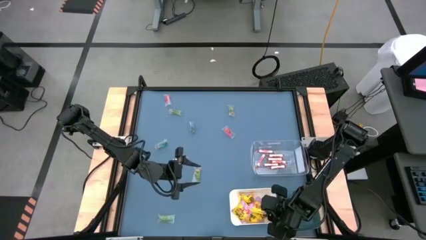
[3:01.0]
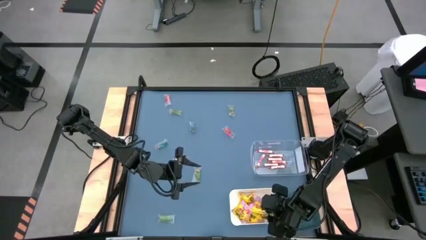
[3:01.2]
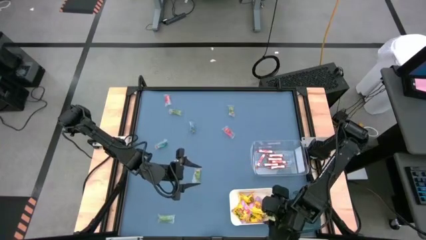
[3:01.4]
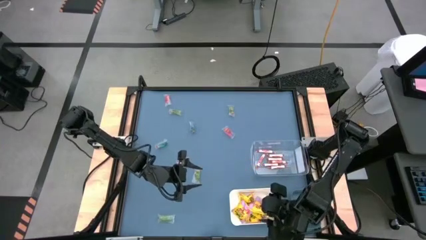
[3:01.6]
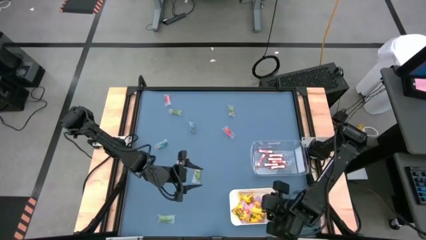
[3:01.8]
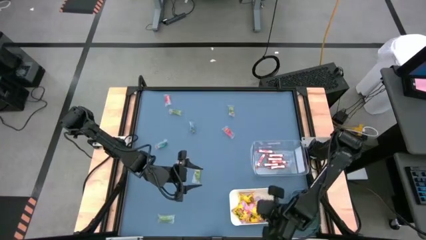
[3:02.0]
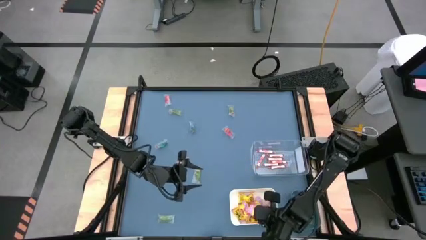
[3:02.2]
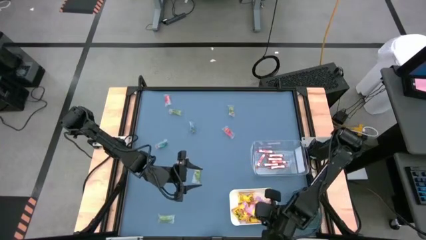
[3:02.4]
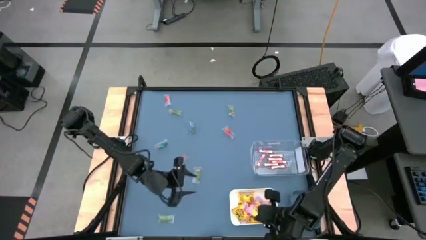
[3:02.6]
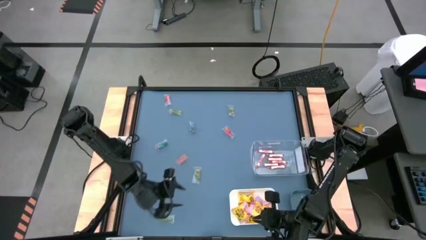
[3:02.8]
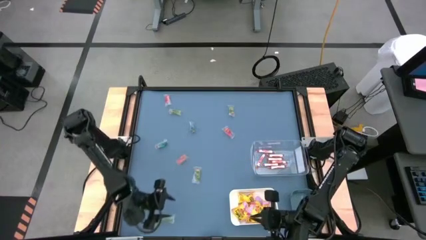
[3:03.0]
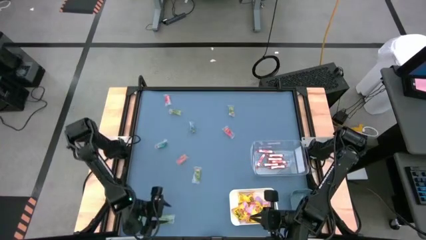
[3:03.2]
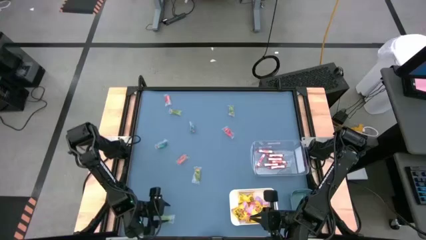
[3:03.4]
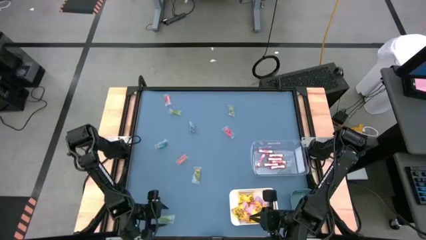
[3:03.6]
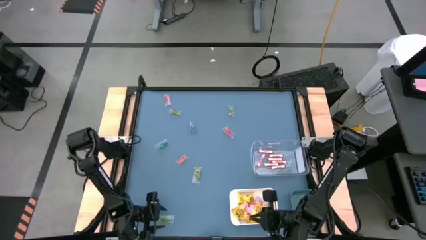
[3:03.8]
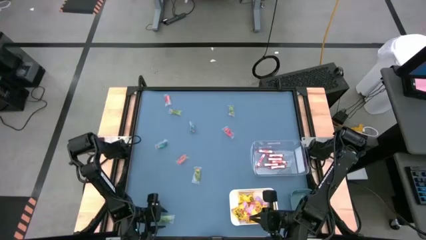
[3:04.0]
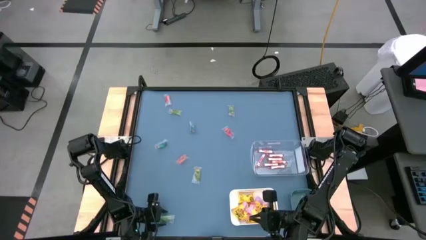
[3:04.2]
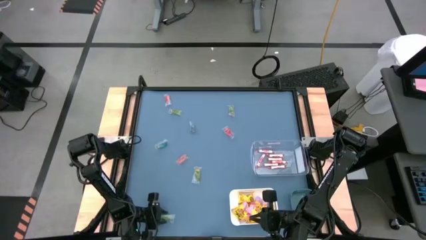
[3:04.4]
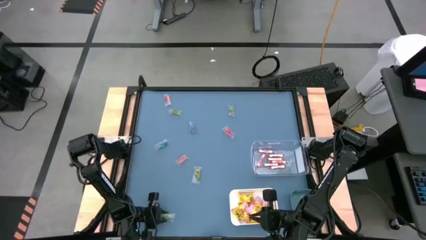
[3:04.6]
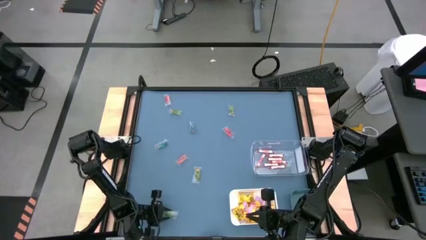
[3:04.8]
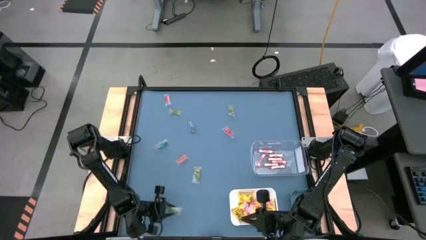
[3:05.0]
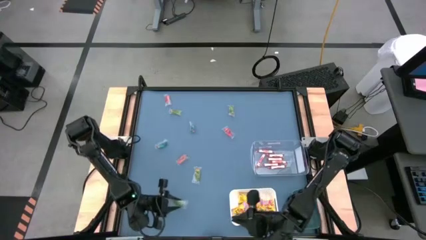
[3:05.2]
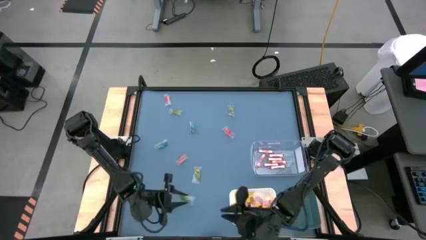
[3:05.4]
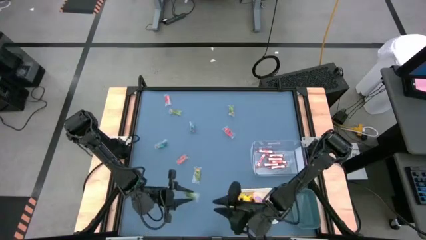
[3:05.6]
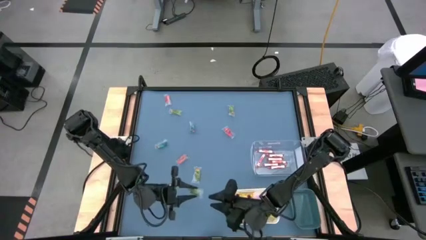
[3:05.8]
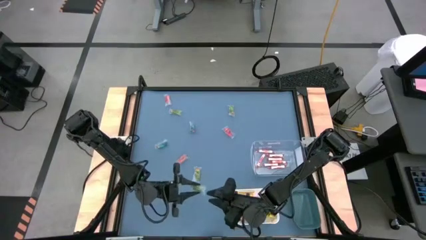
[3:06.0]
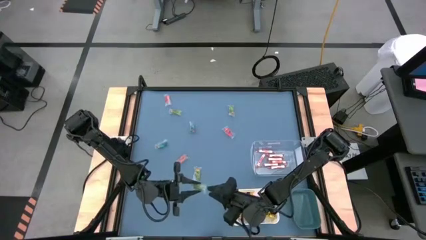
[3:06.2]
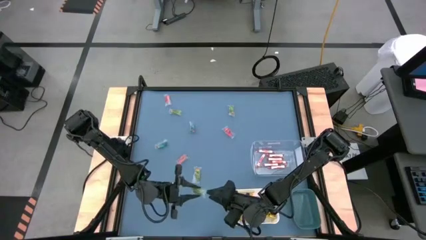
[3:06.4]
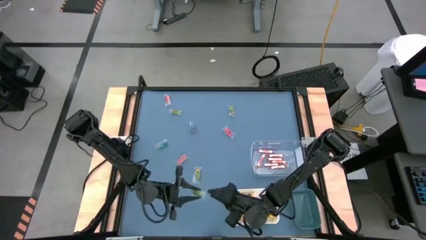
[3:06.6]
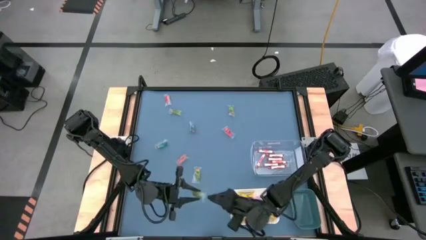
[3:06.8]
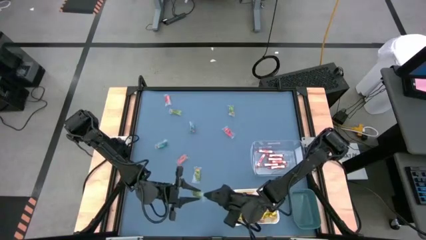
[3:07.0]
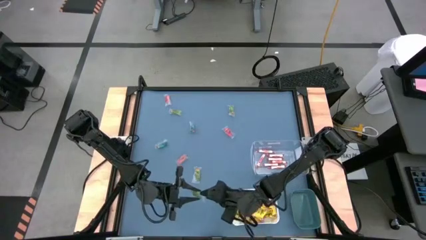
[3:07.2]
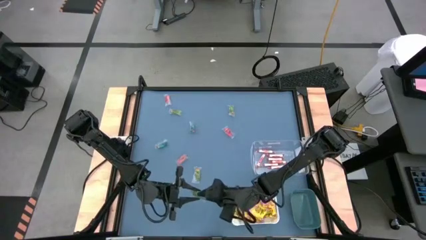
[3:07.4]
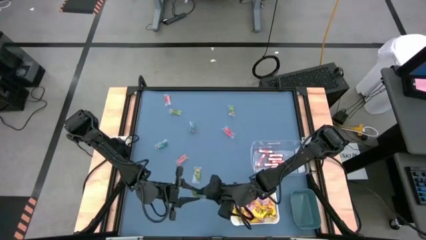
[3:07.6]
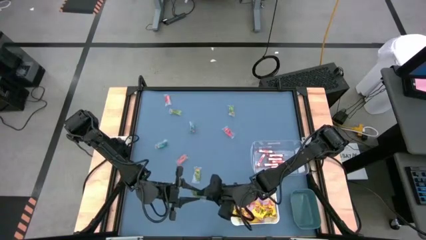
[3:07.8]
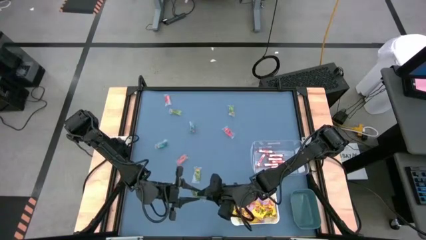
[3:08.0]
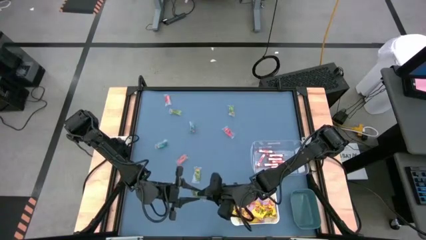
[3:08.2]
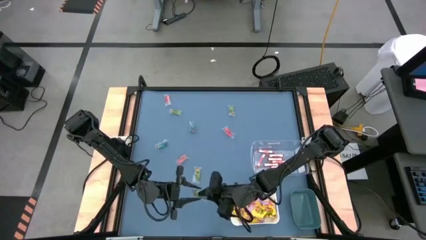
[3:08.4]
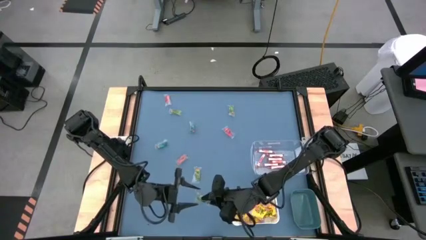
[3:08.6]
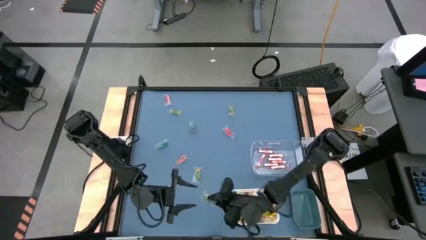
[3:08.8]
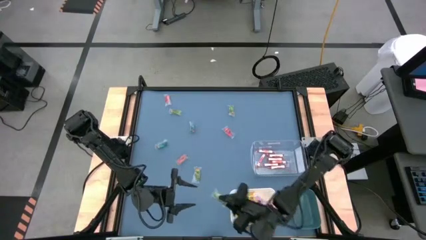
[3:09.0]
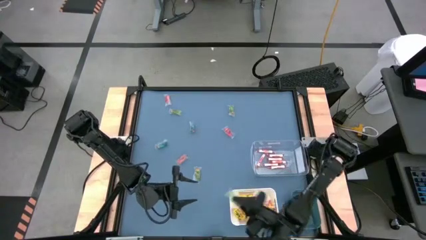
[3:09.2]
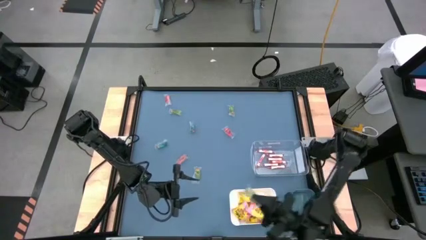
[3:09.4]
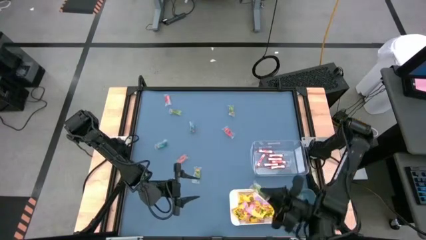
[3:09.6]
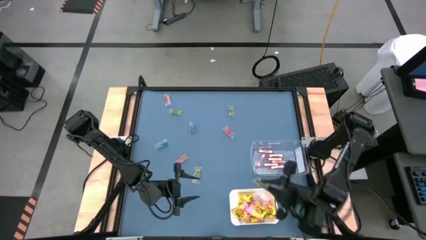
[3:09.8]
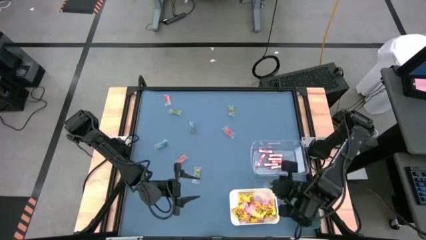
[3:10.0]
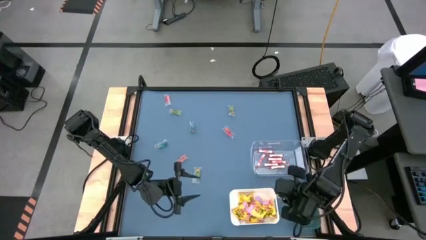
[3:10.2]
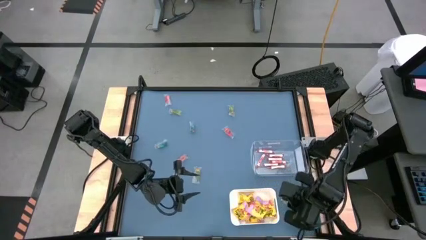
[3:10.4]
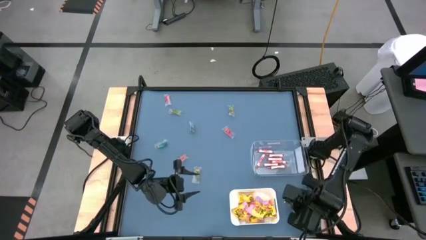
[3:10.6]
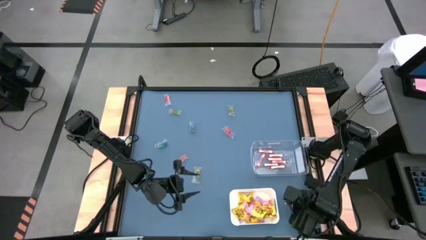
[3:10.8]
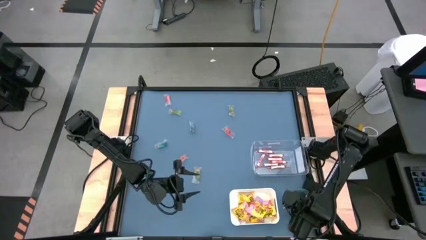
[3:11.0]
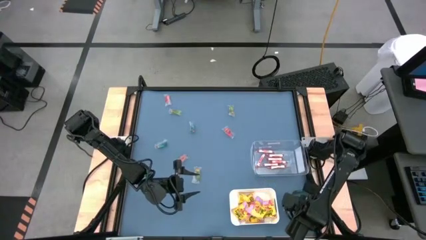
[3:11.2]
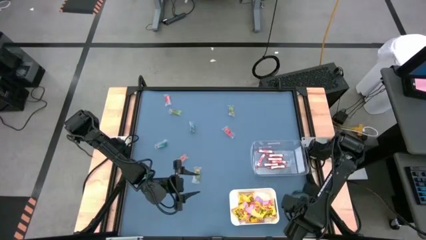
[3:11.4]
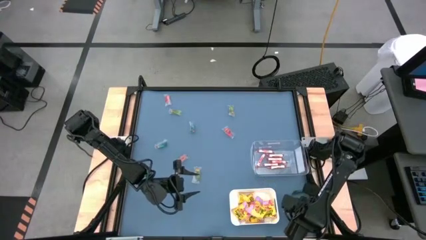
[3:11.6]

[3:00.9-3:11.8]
Task: Sort candy
Put the green gummy into the blue bin

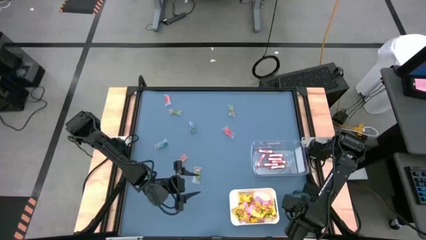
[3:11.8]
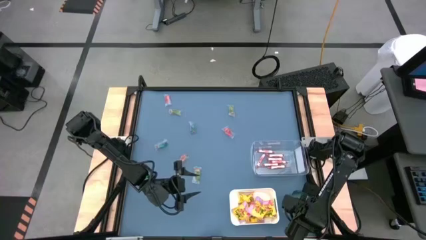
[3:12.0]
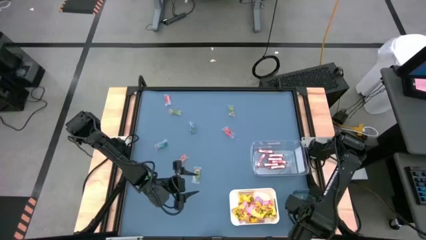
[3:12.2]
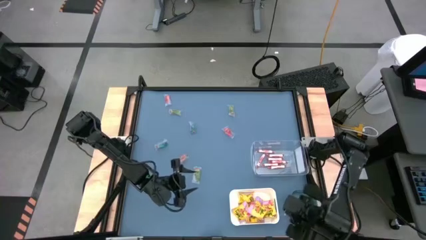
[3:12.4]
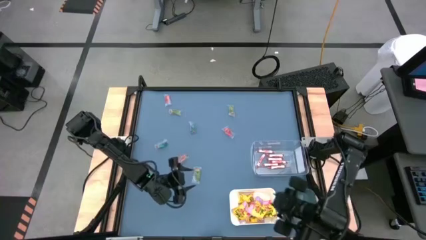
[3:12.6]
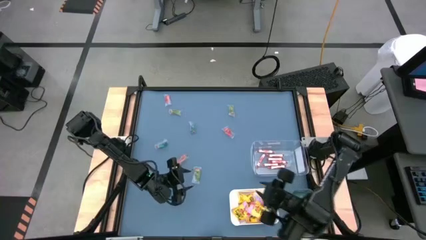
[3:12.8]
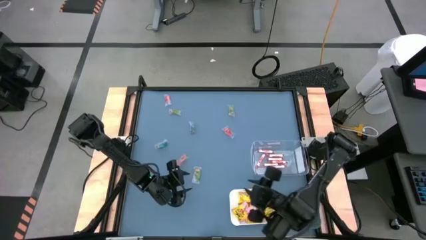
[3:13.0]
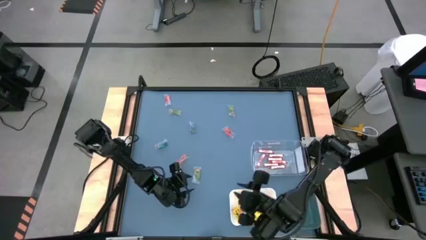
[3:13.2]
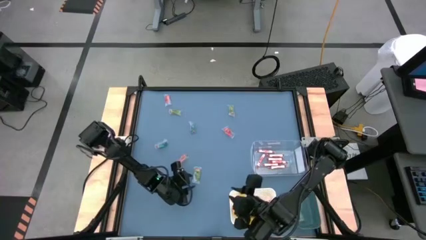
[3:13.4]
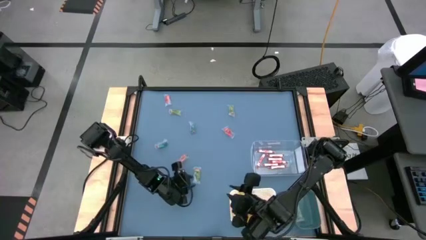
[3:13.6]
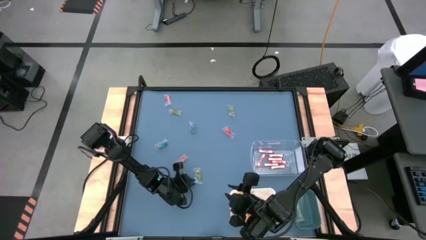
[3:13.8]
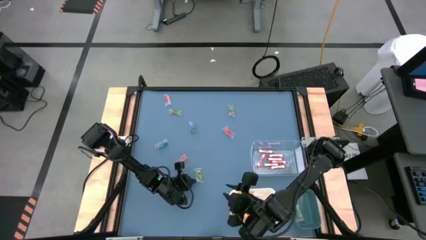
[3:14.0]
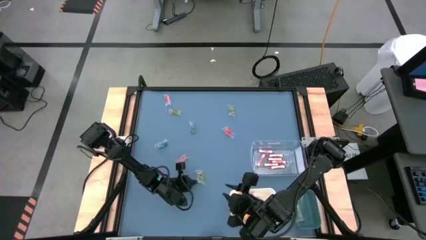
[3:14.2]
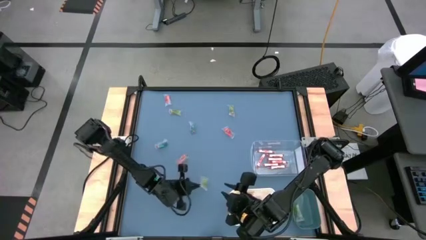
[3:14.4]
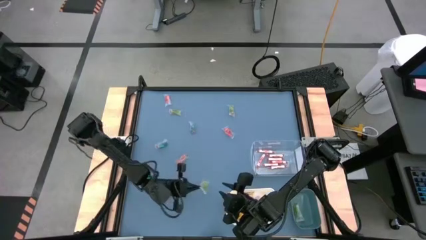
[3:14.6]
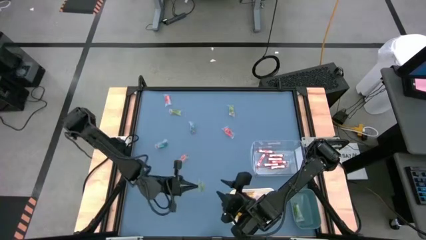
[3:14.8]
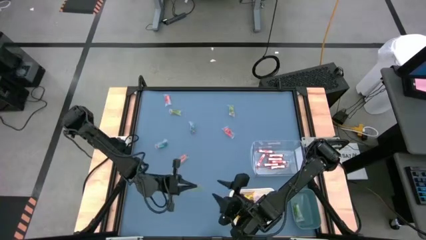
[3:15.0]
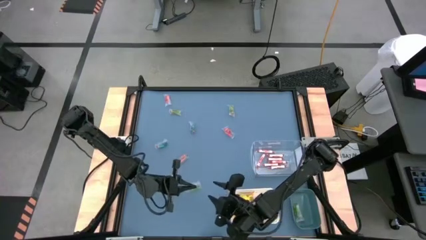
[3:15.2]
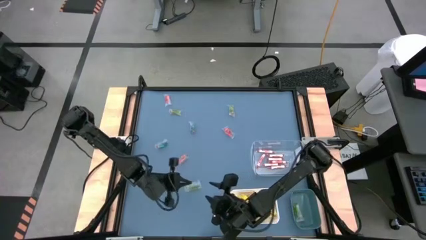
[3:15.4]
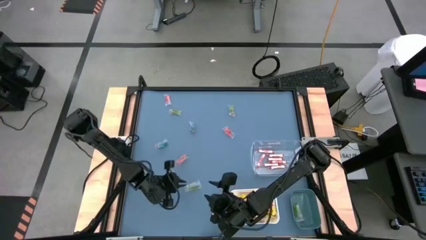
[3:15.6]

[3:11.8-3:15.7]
Put the green gummy into the blue bin

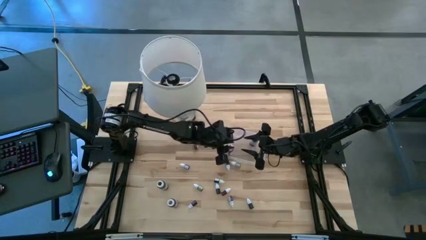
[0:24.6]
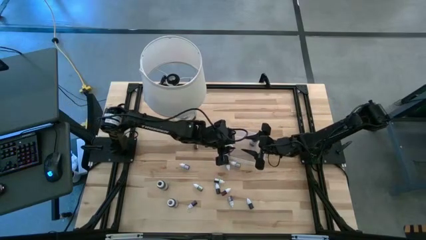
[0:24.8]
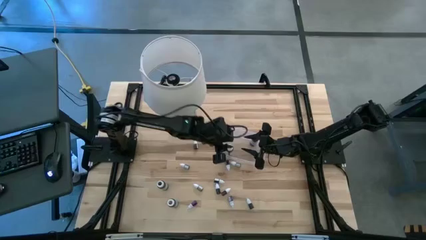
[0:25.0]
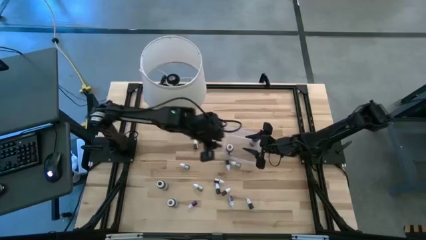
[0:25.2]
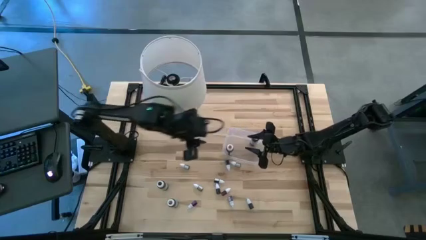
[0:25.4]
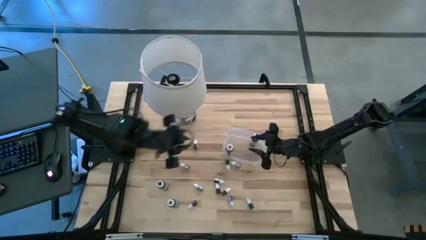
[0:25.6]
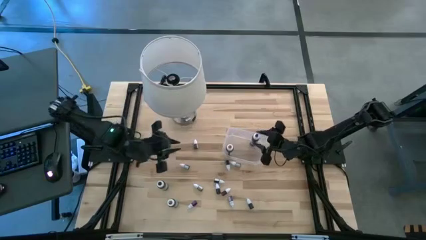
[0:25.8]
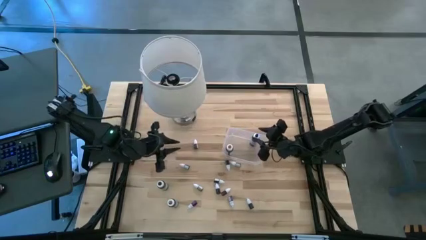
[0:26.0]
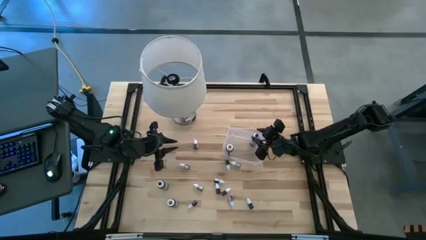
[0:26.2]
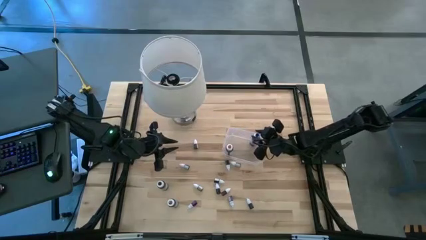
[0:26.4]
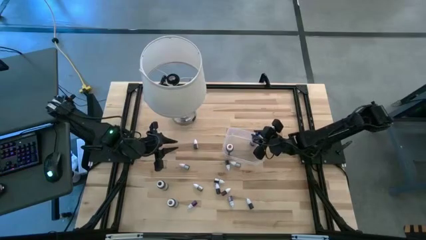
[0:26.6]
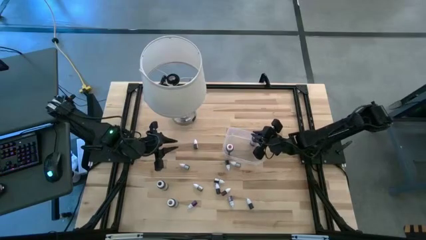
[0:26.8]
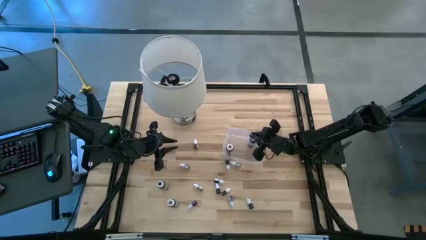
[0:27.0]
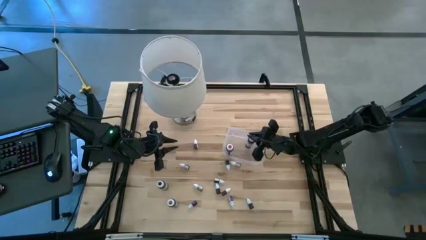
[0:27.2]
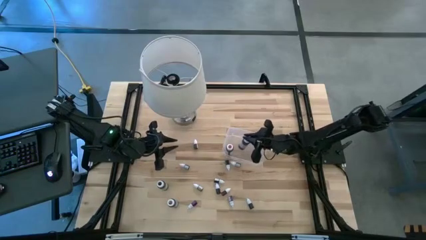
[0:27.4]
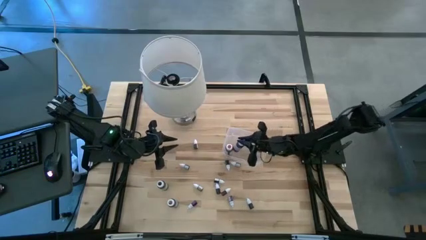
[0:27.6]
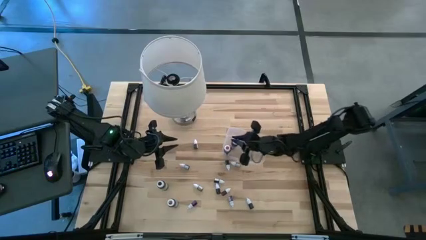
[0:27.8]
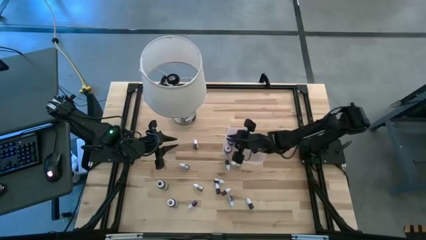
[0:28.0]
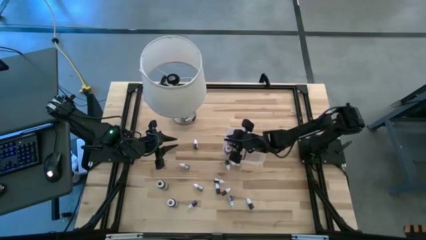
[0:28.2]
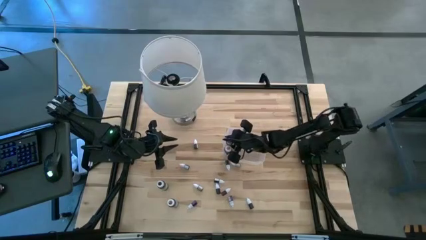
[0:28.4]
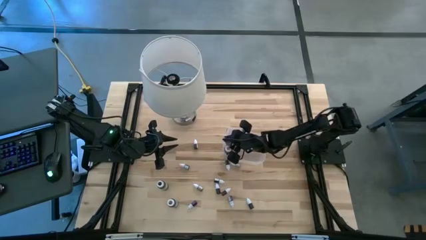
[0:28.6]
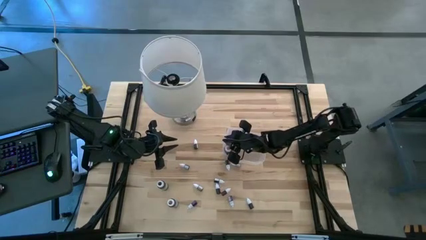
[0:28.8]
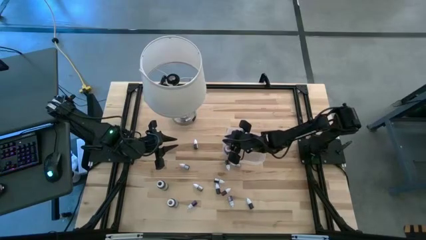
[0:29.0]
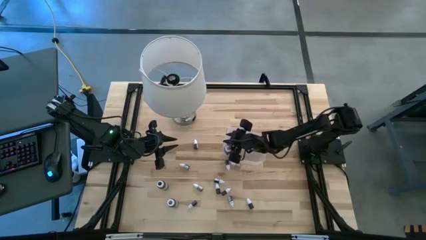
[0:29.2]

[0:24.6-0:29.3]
Task: Pick & Place food coloring
Adjust the large blue food coloring bottle in the transparent bin
